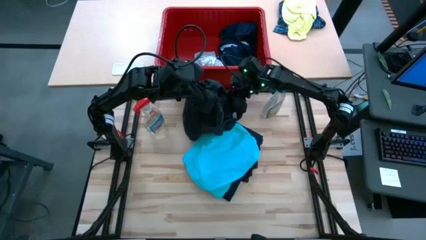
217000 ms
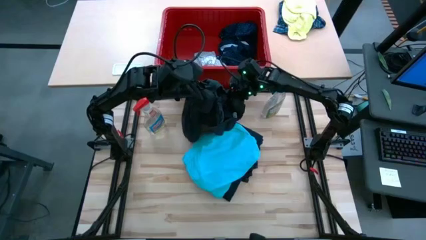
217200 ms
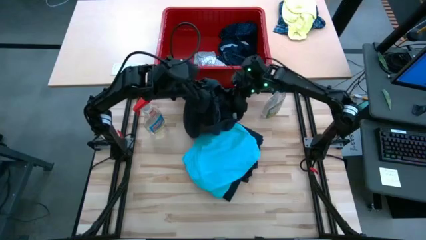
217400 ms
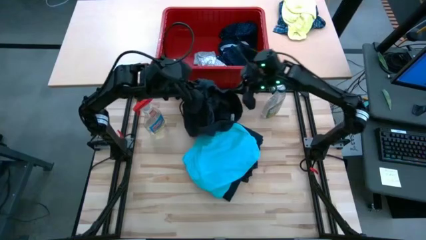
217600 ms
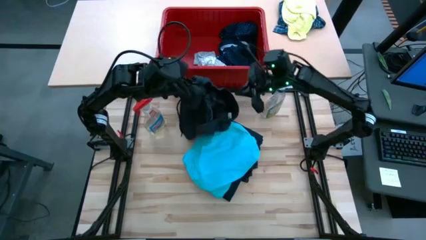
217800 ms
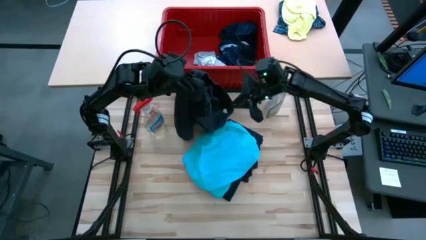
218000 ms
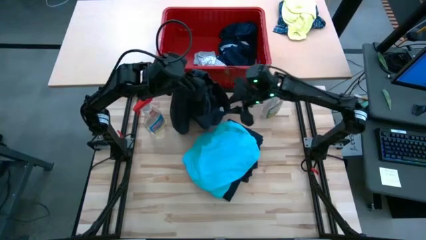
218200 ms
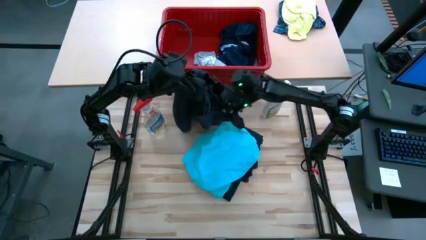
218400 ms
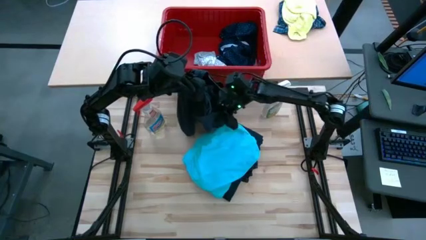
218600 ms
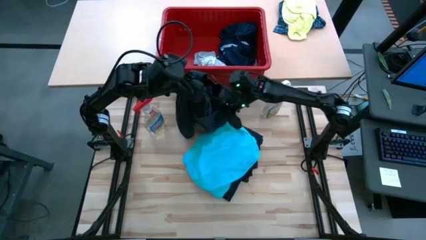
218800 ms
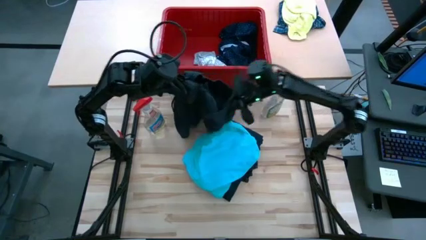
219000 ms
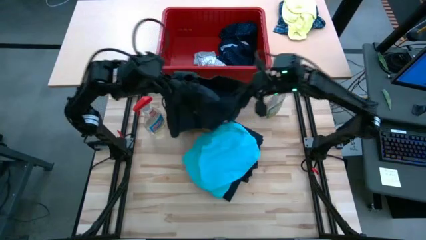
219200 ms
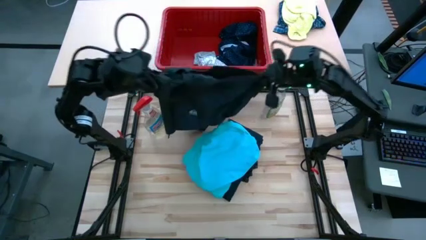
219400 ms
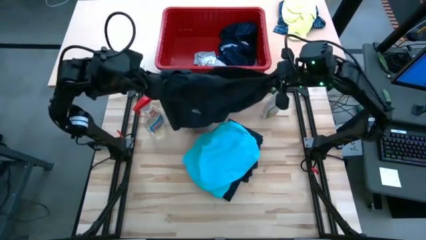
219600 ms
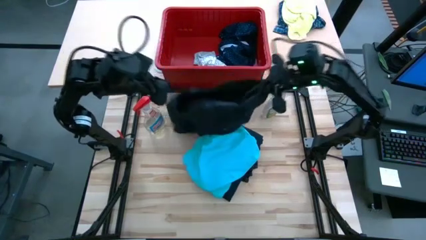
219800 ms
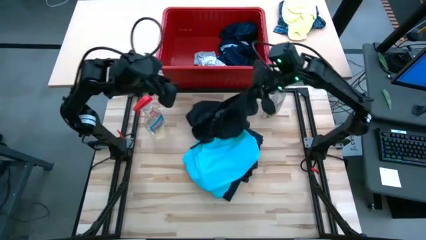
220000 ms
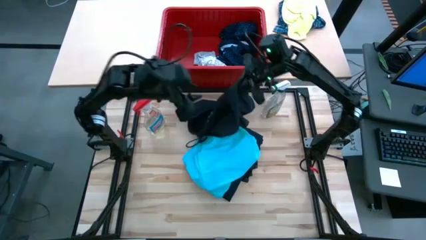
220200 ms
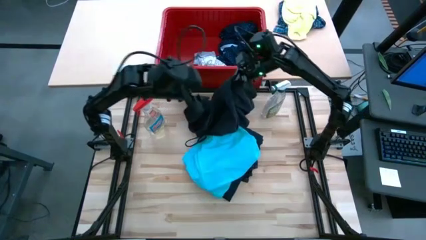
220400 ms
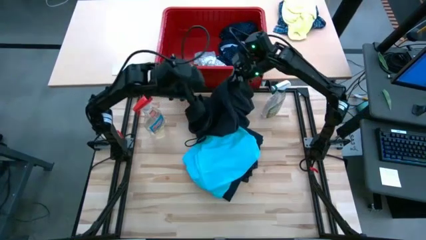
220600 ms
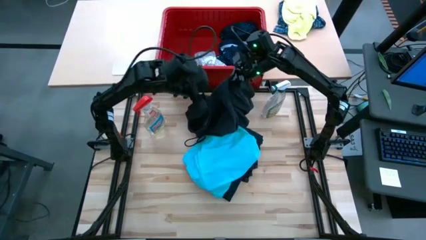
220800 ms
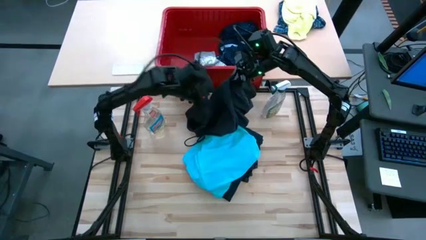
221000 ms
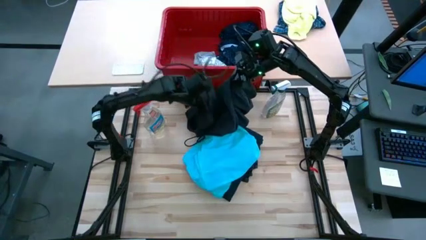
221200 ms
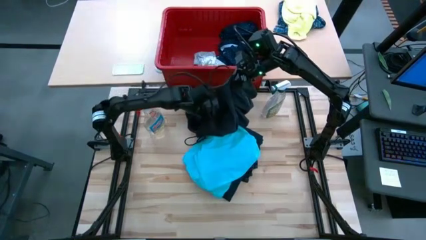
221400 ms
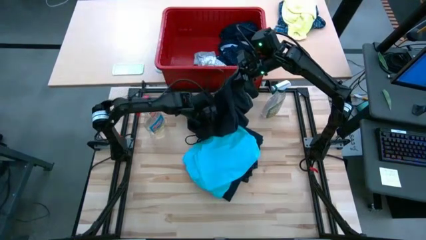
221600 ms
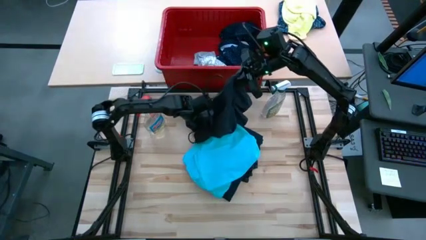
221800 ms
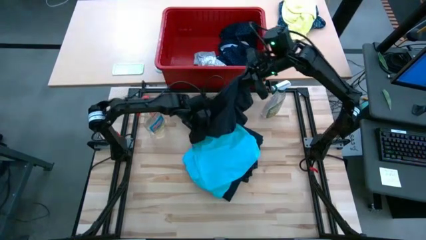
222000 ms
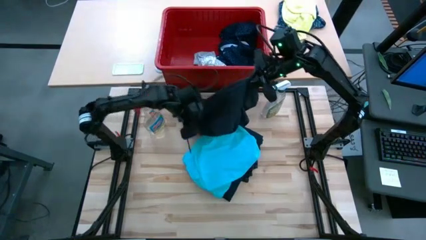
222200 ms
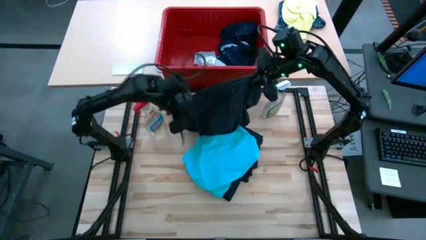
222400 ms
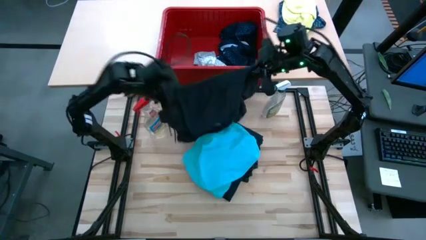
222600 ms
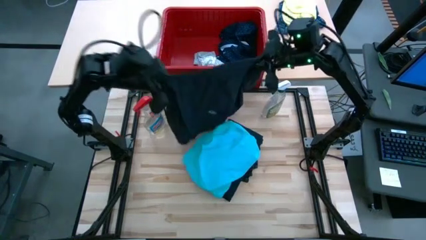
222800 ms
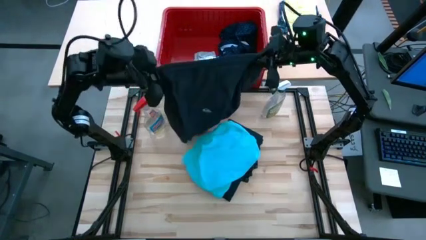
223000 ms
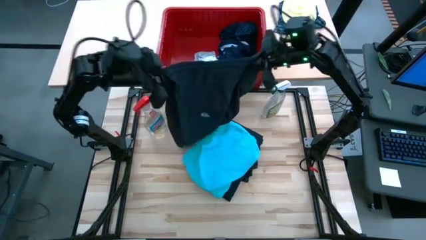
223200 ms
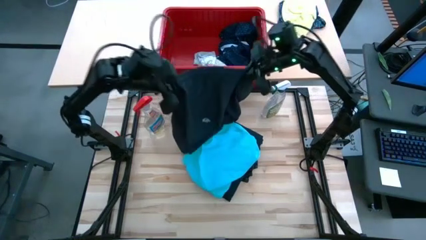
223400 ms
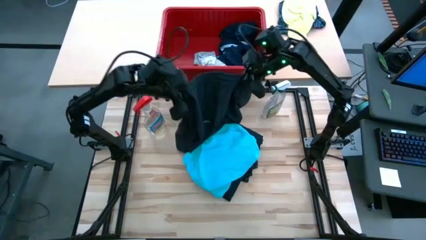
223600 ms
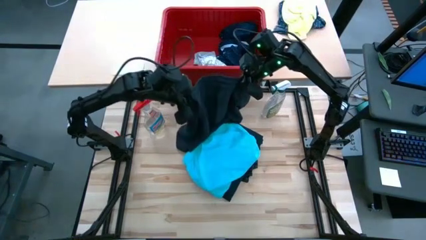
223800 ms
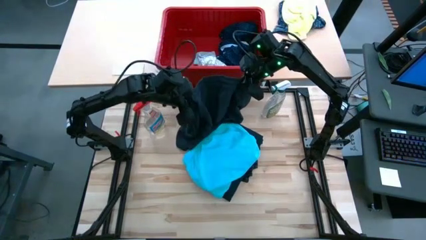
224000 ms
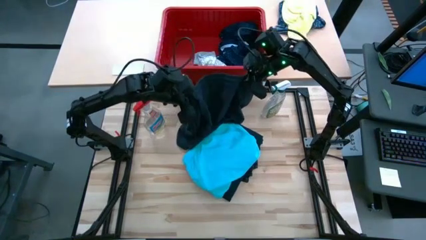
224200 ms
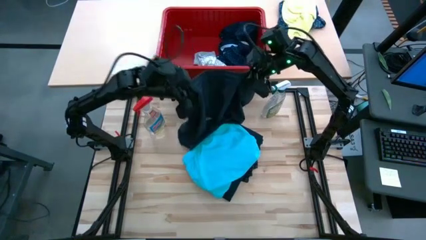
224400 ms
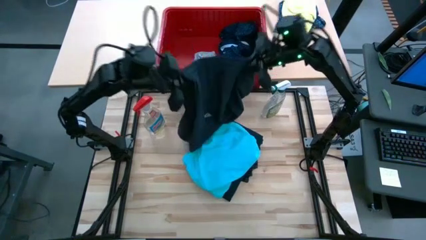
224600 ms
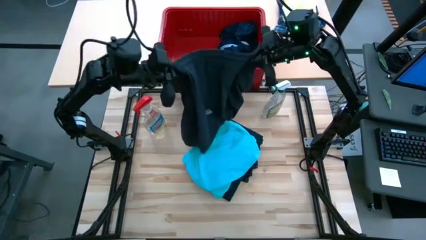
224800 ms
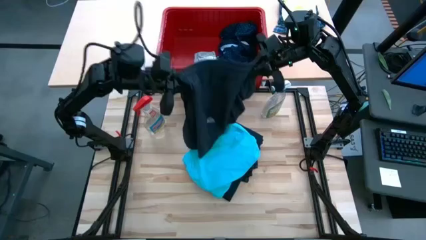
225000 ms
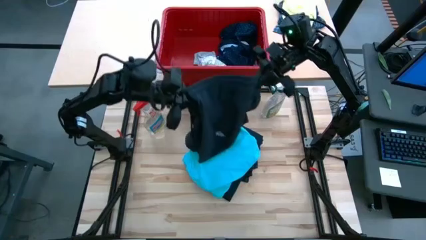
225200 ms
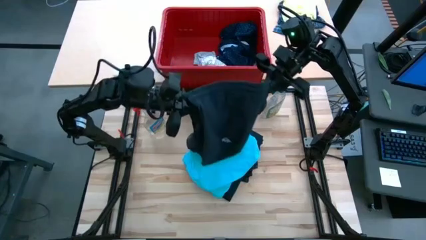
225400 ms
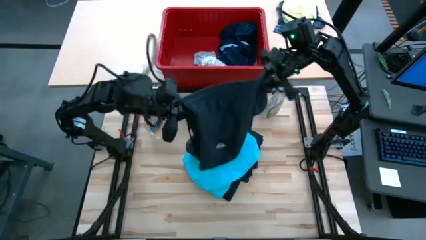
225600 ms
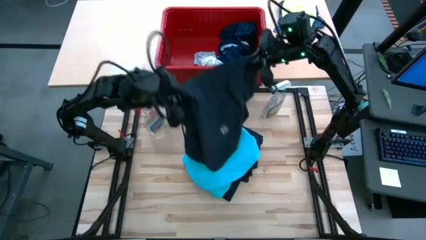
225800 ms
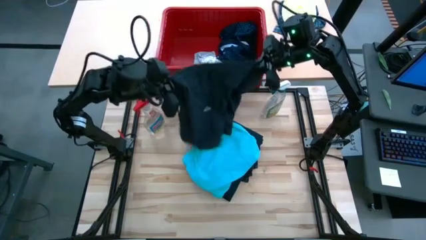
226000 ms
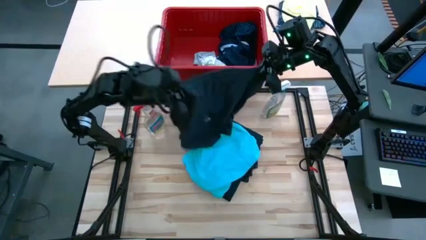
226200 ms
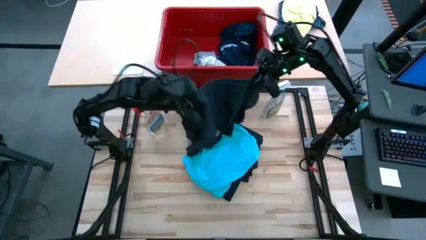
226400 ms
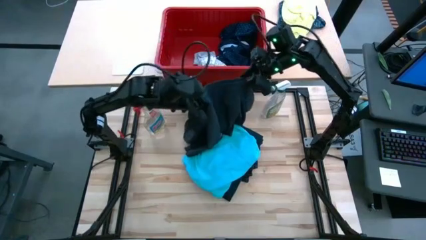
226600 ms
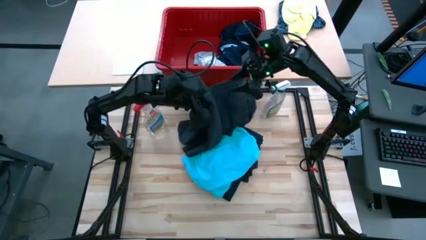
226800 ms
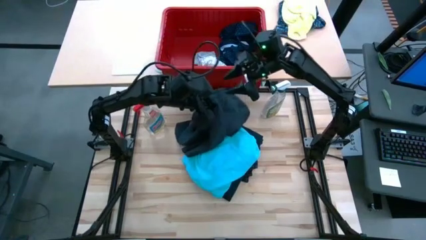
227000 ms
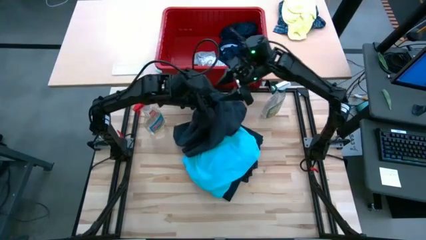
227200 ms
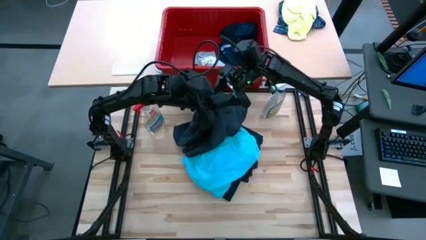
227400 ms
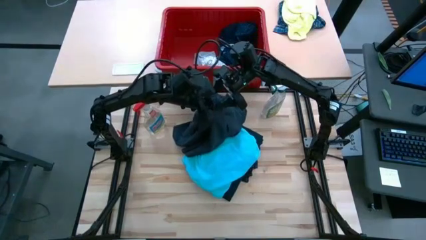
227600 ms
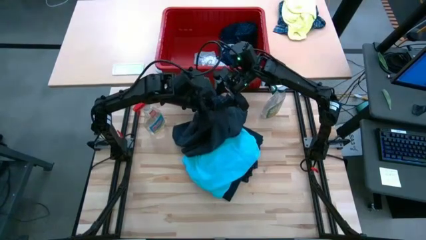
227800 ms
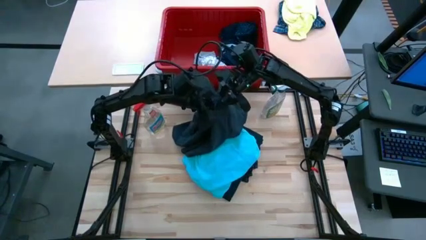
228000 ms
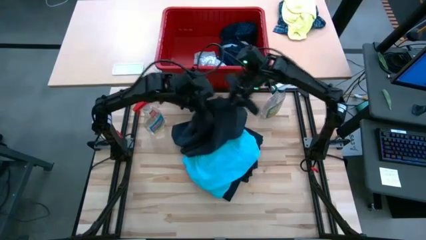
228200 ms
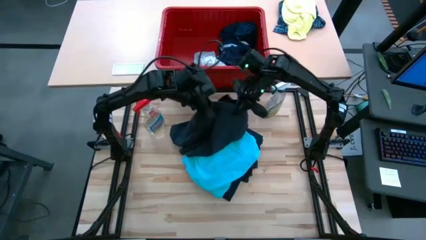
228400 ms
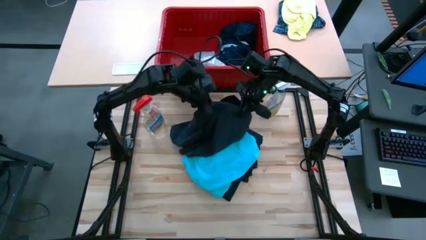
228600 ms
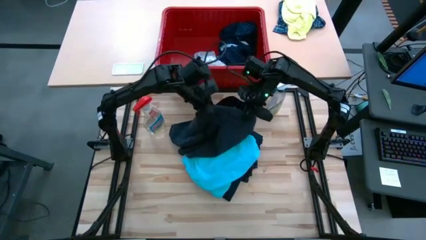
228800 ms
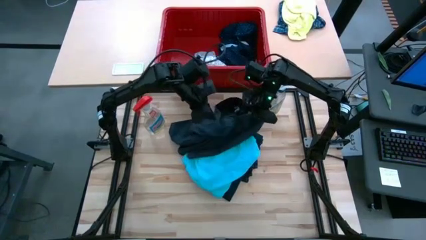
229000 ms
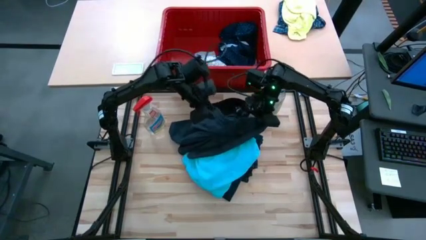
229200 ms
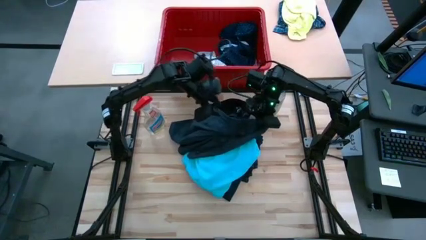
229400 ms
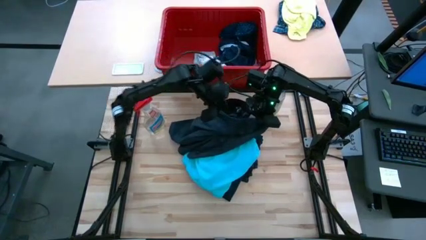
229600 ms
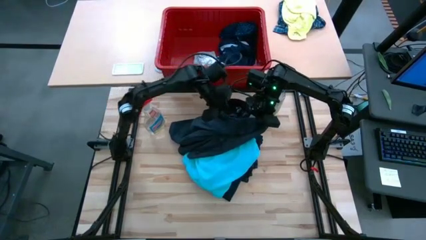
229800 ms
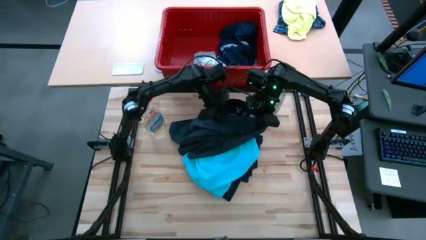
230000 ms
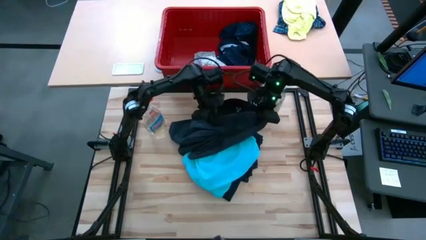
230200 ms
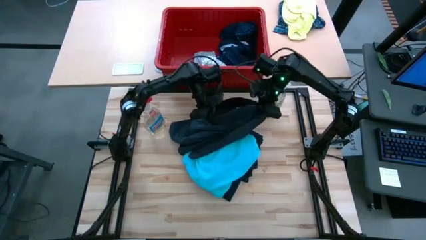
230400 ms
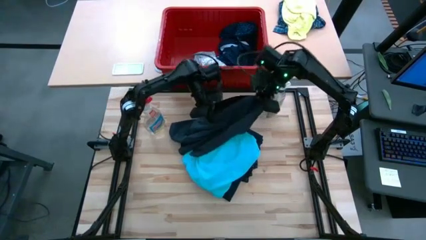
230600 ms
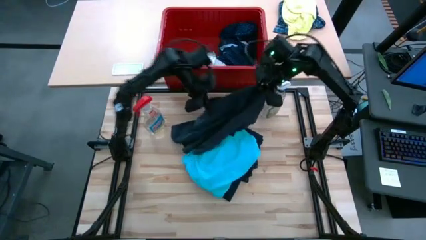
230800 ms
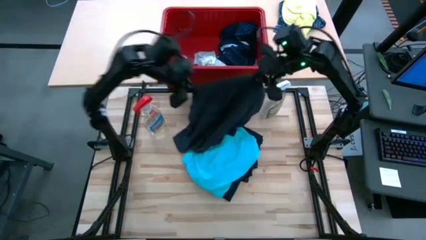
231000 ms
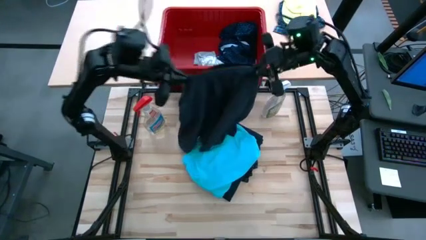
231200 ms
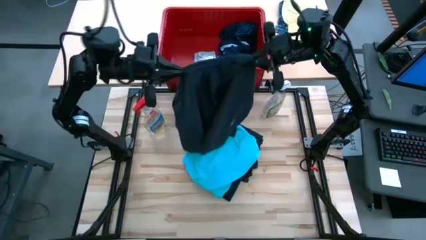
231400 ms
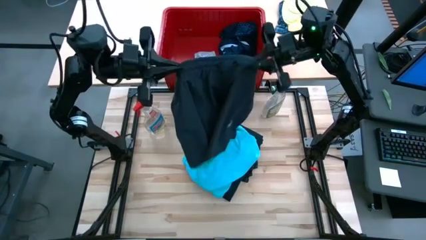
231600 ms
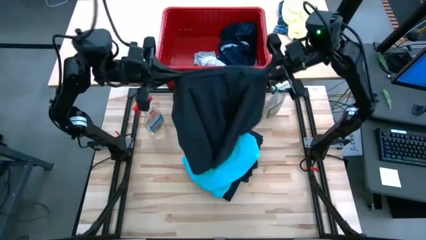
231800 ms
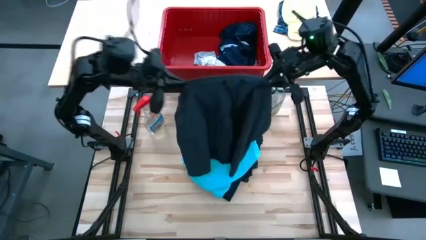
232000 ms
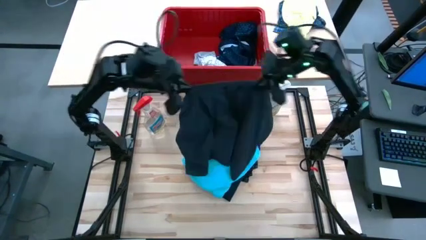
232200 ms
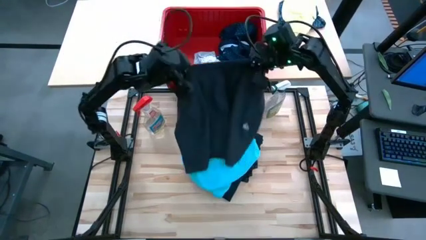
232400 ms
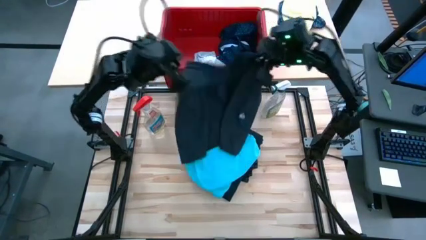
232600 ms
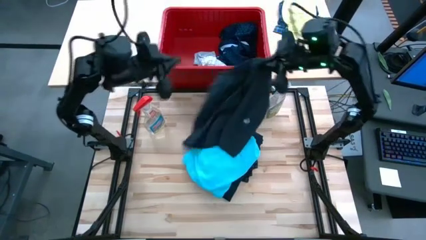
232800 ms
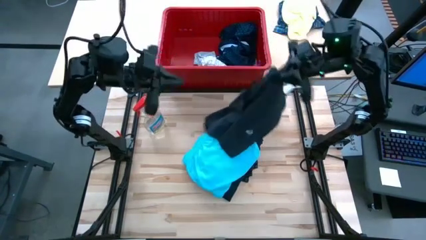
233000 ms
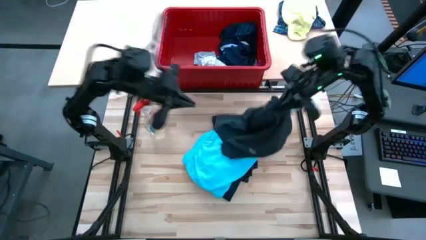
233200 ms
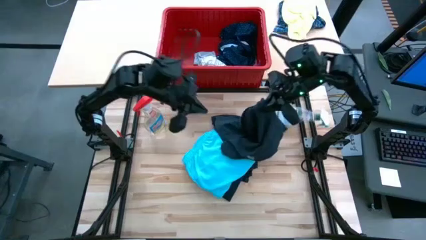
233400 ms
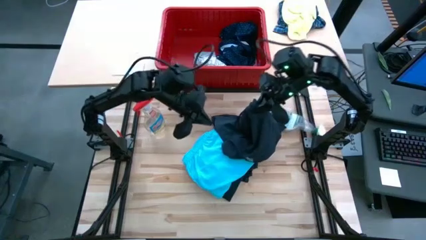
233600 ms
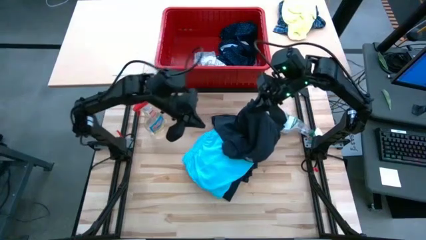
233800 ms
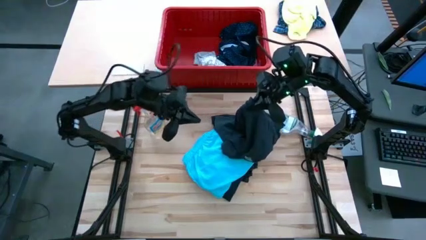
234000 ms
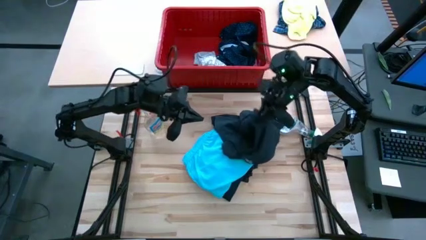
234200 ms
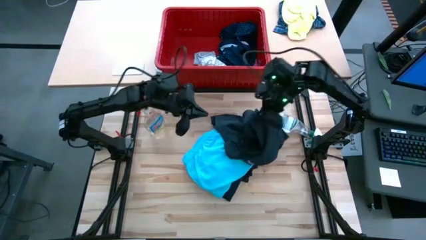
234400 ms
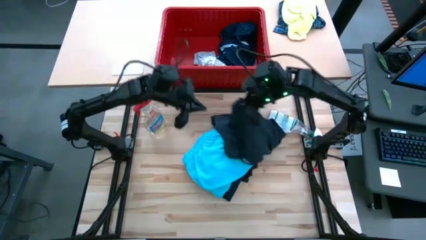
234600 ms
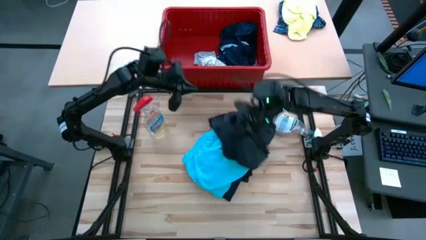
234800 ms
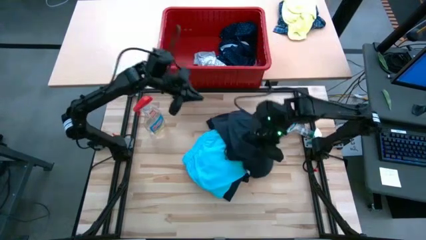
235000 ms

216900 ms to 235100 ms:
Task: Fold Laundry from Bin
Fold the black shorts
